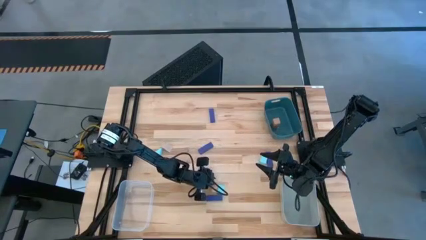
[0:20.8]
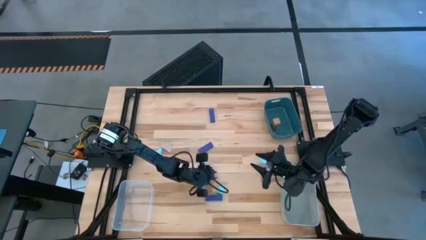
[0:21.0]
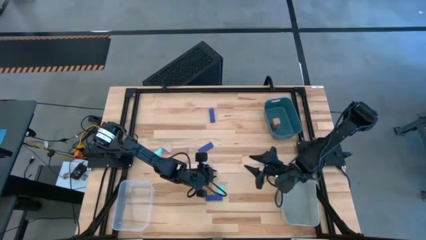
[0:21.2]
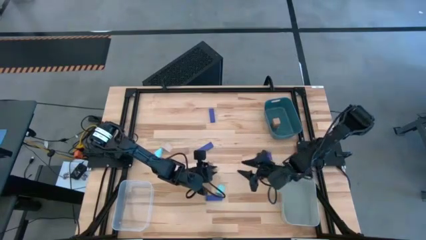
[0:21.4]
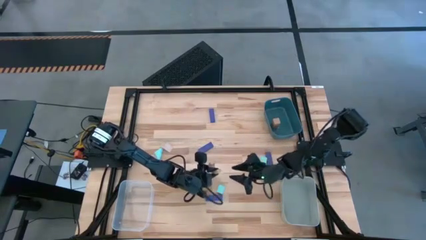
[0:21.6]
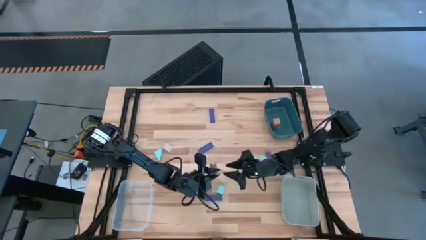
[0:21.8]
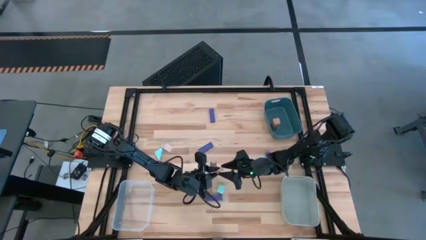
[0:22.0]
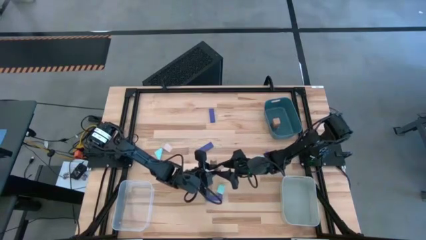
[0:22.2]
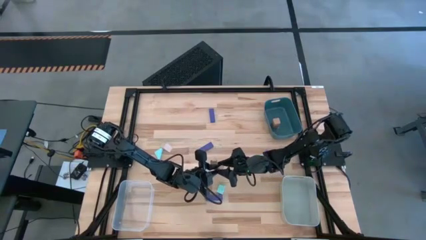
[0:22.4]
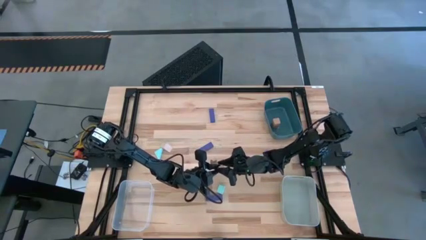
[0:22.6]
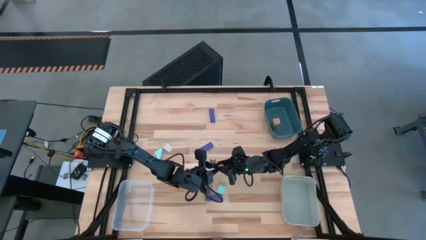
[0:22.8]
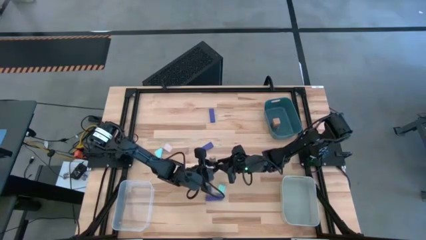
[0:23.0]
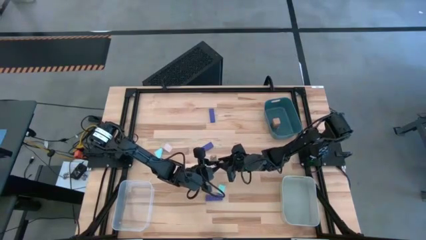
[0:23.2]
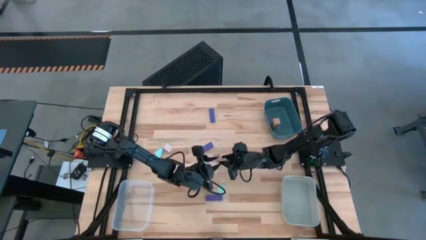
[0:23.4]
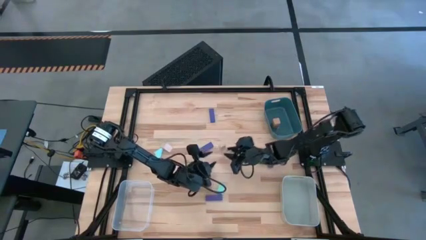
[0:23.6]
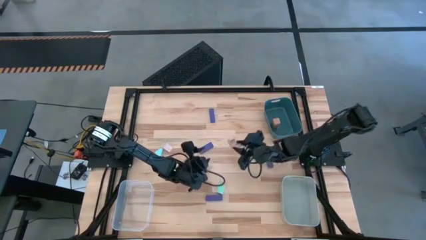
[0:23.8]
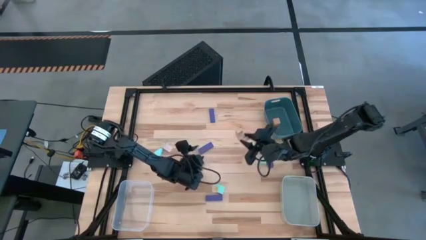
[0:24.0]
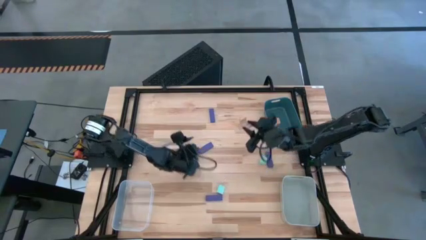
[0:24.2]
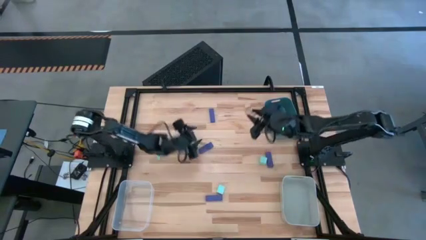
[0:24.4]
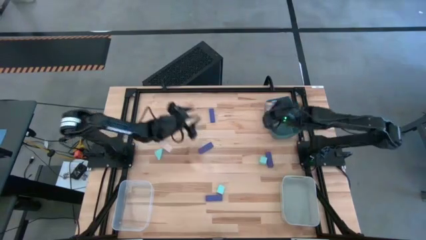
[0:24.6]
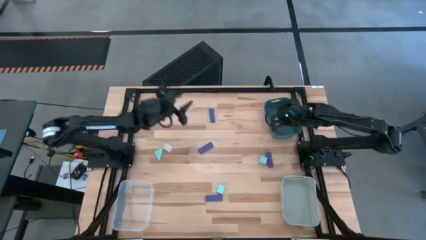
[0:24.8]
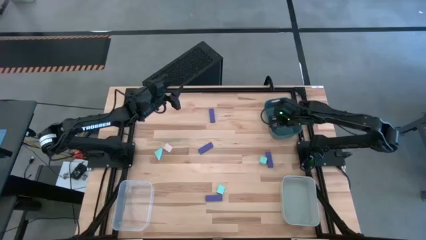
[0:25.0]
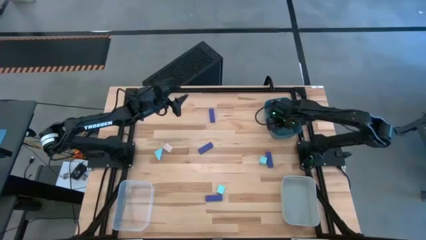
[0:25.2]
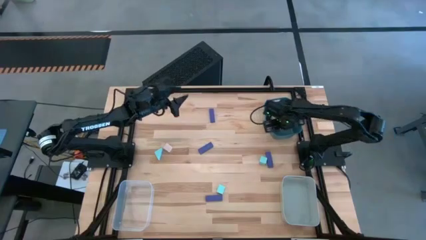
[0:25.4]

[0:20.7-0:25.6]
Task: Sort & place blocks by color
Put the bottom light brown block into the light green bin

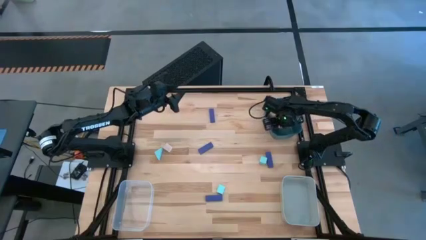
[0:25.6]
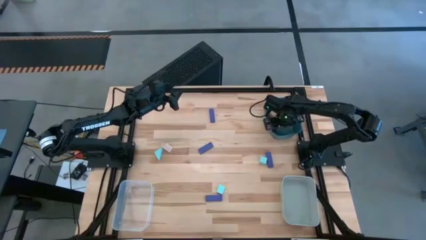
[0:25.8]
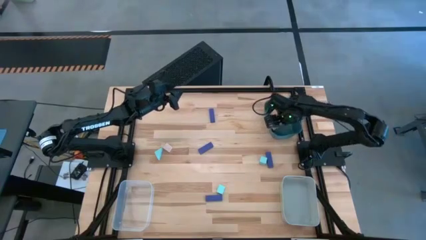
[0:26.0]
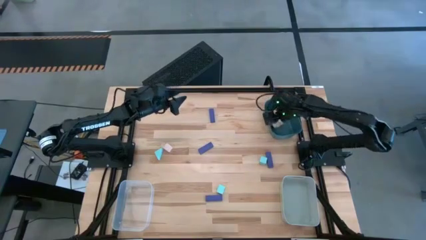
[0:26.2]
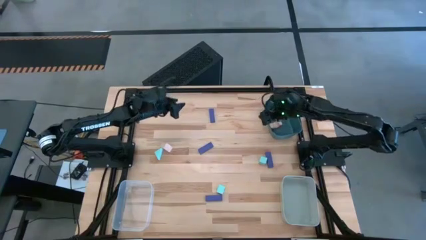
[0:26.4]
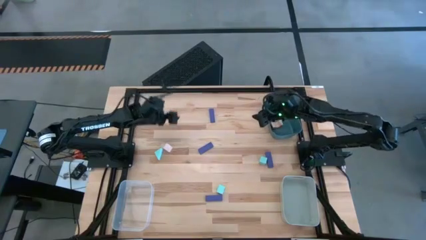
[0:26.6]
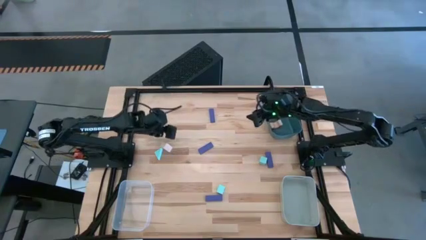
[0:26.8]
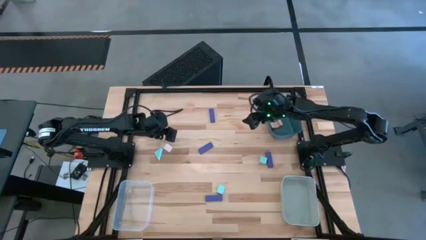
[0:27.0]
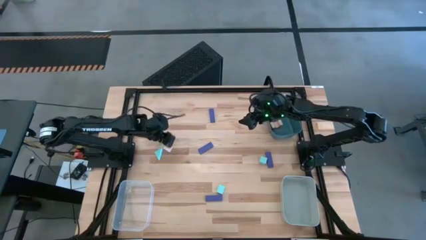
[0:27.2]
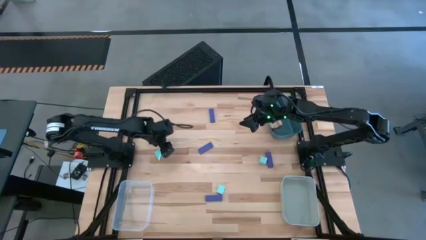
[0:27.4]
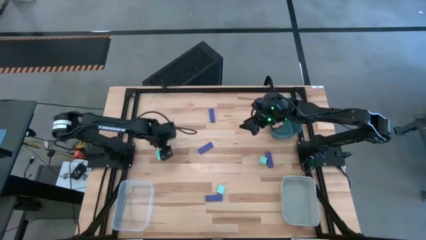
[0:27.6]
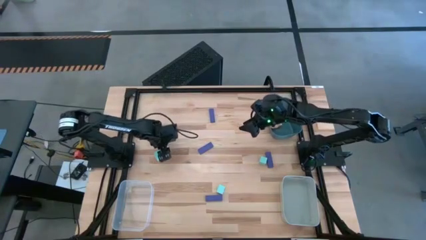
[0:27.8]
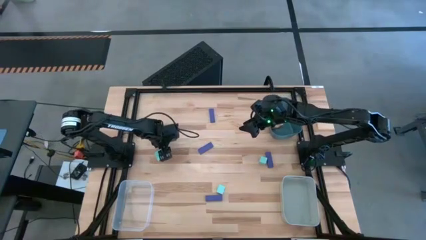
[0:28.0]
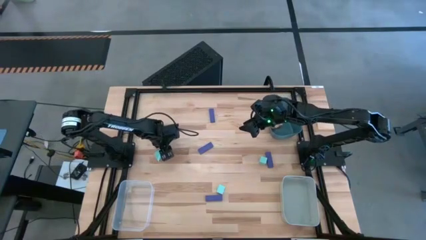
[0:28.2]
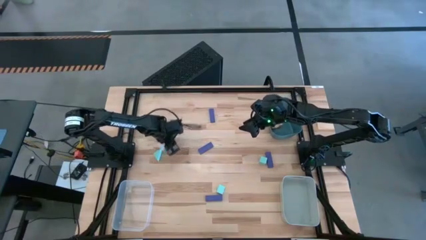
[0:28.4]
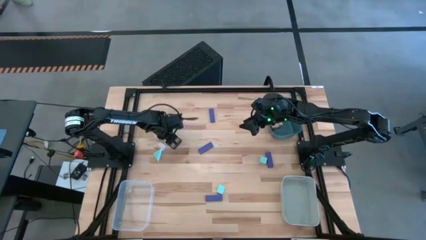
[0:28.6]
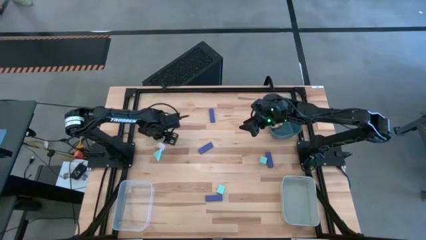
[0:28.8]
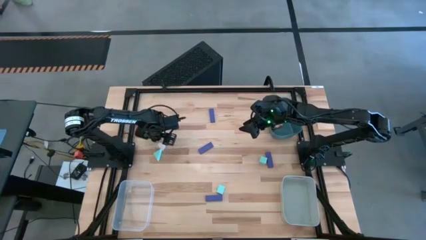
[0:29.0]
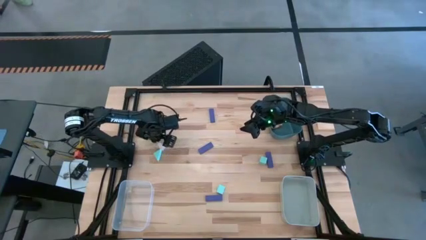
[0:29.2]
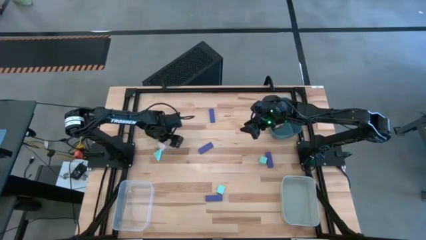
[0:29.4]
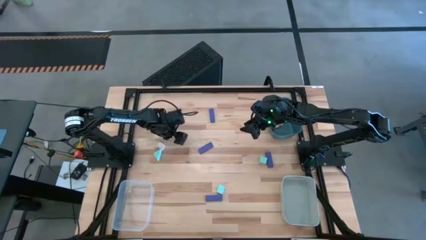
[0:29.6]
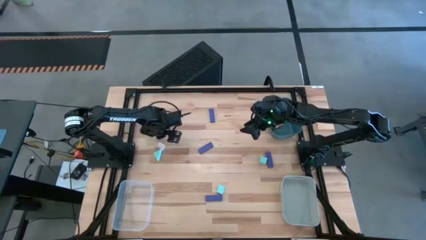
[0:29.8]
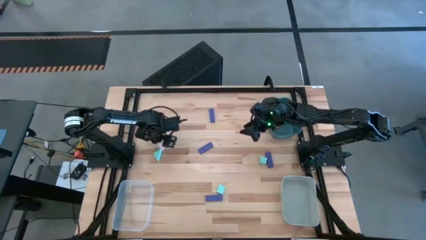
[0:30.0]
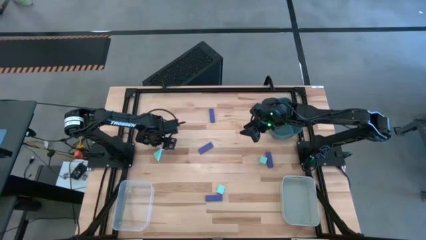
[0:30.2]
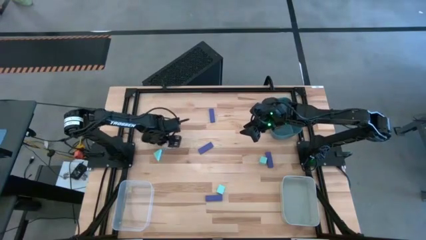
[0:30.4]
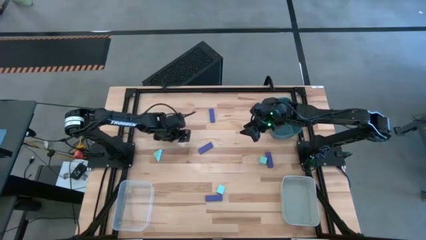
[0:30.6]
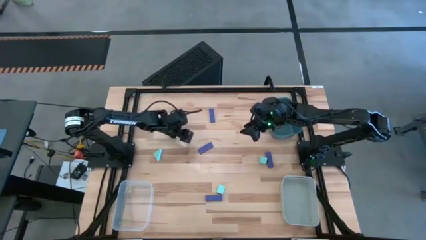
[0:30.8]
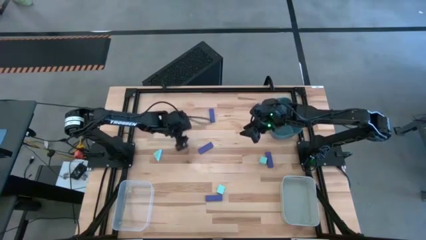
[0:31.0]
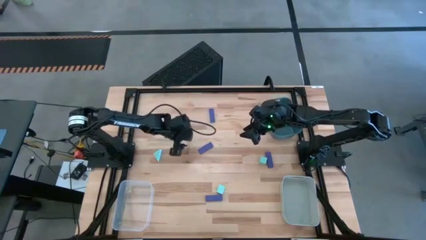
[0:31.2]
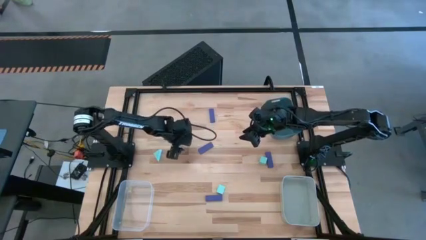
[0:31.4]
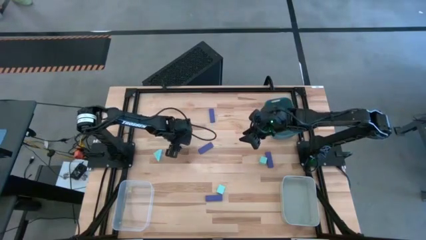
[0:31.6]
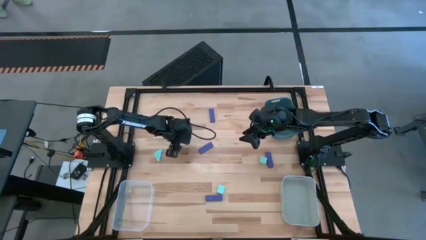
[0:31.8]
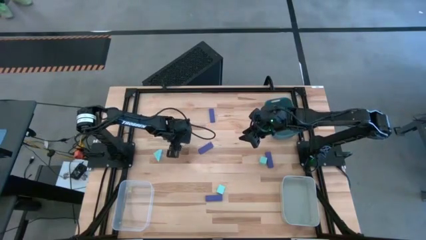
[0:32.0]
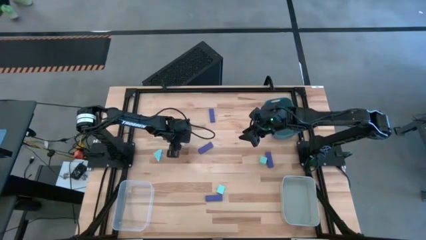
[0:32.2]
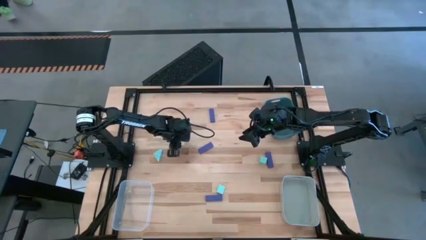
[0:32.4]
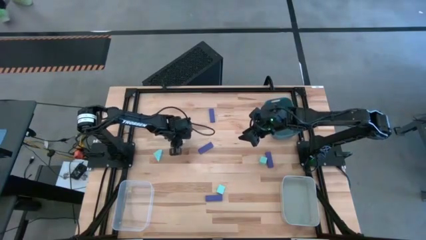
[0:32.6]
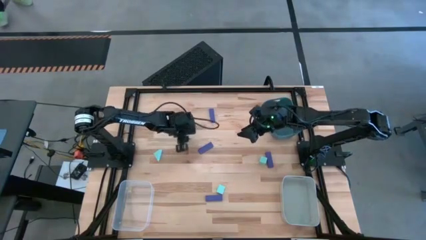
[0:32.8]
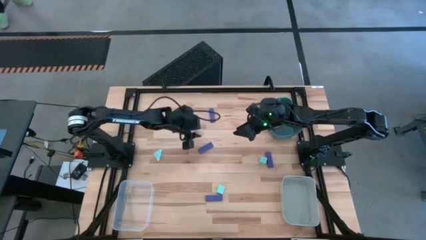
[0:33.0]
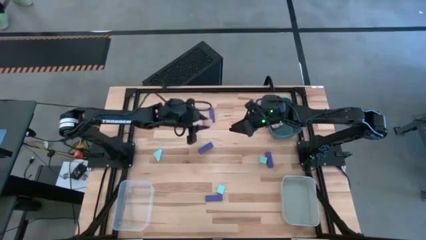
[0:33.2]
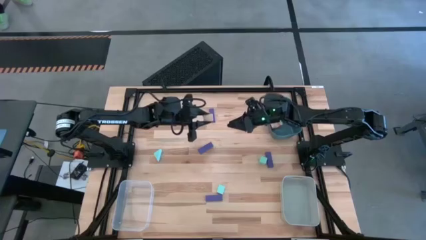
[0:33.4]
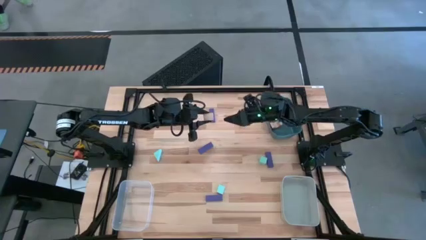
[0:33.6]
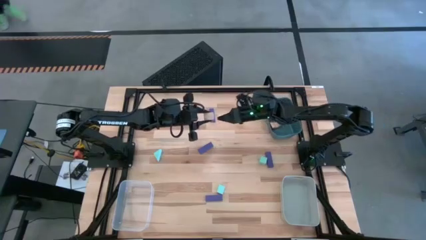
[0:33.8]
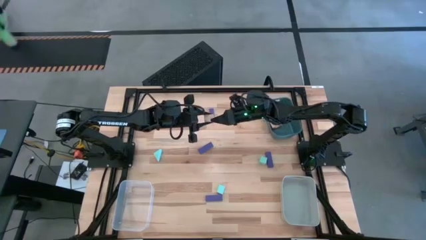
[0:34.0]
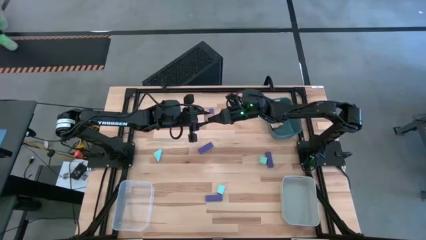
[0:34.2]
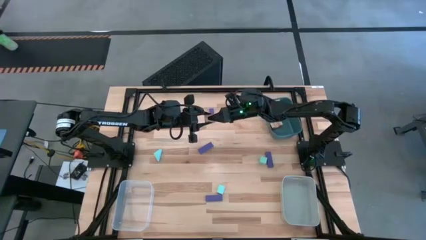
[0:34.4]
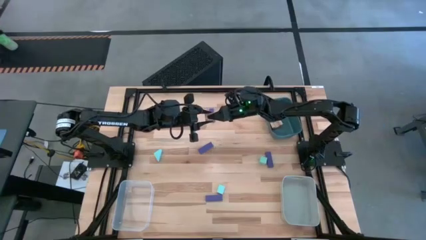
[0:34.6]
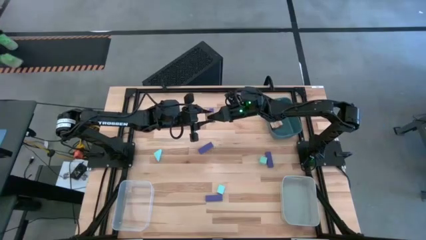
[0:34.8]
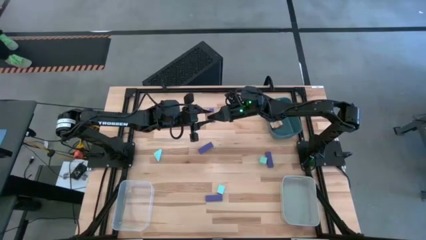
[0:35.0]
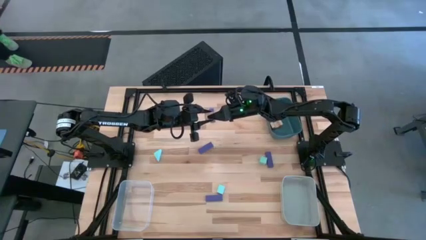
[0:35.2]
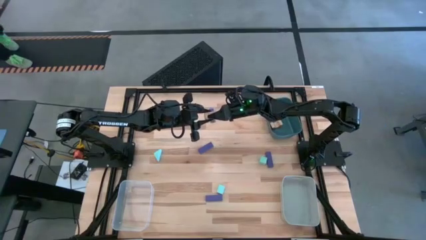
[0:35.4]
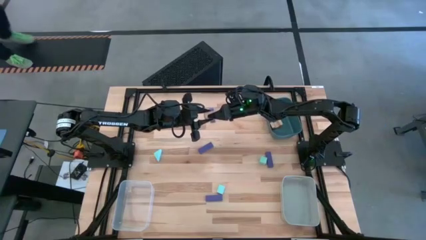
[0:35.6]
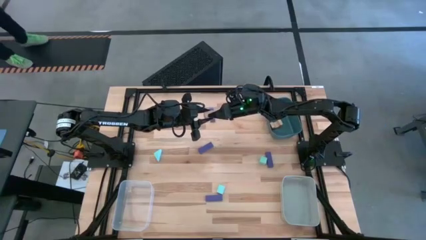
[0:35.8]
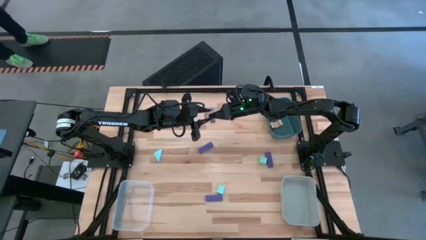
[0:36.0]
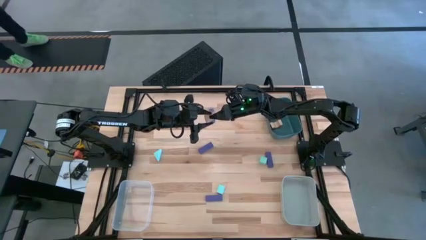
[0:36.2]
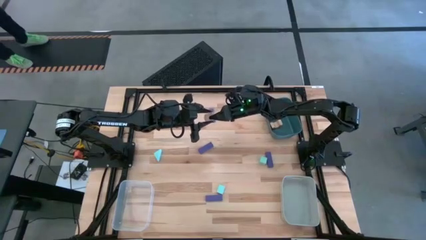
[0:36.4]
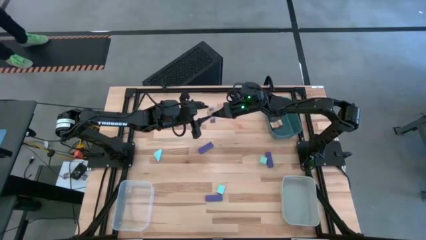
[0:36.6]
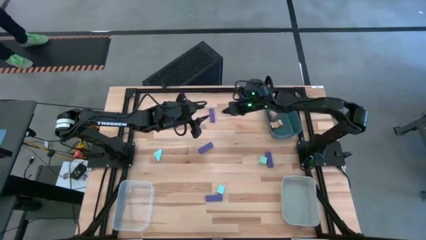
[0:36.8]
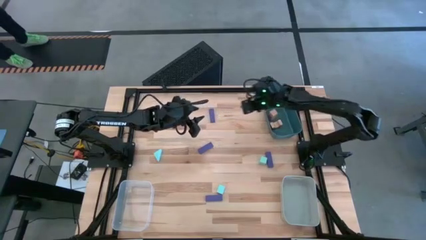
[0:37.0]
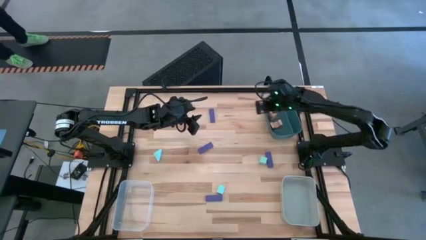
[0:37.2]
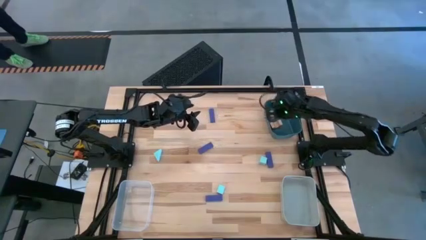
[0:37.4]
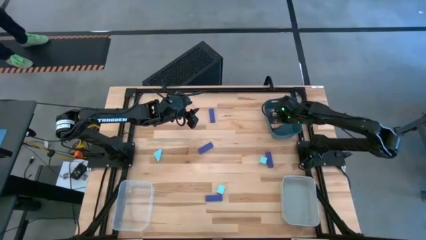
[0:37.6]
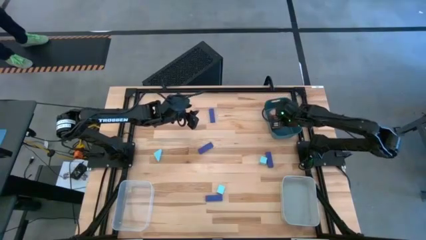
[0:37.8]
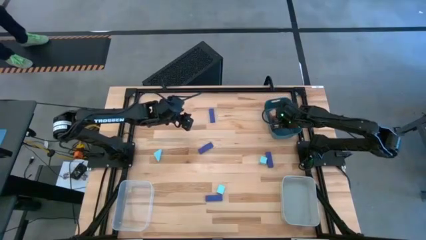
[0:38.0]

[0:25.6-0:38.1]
Put the light brown block into the light green bin
